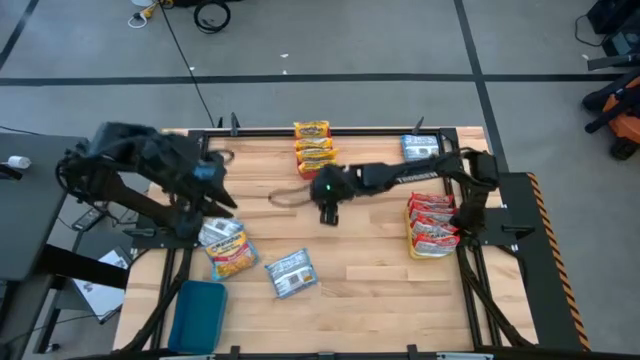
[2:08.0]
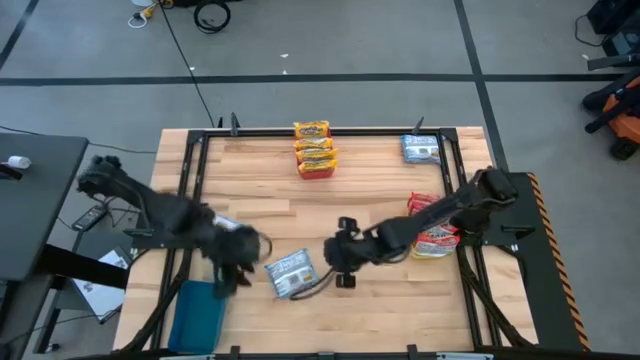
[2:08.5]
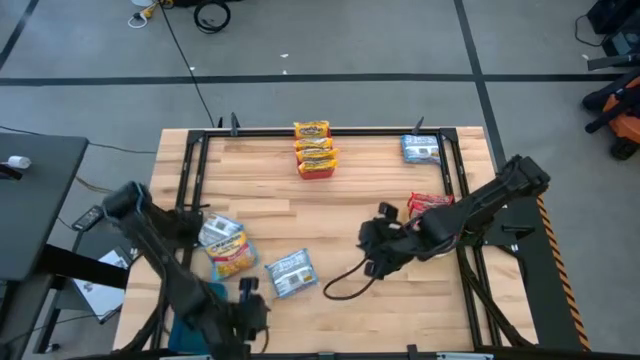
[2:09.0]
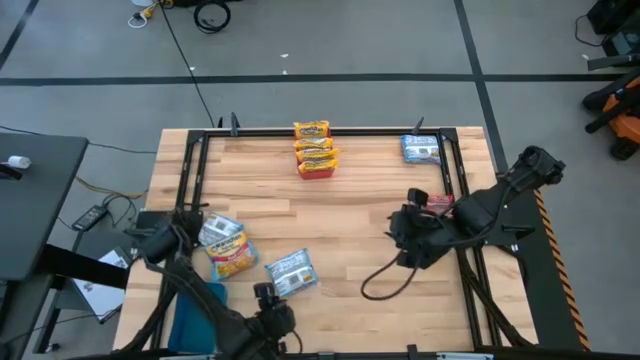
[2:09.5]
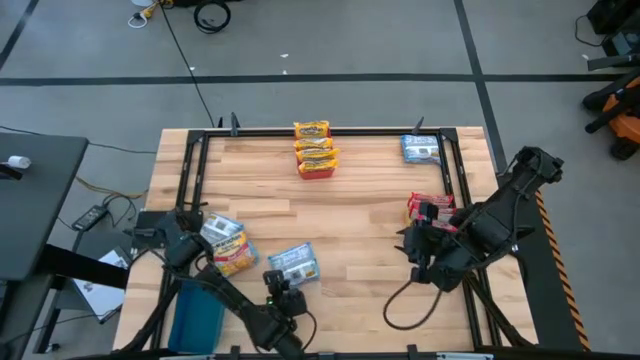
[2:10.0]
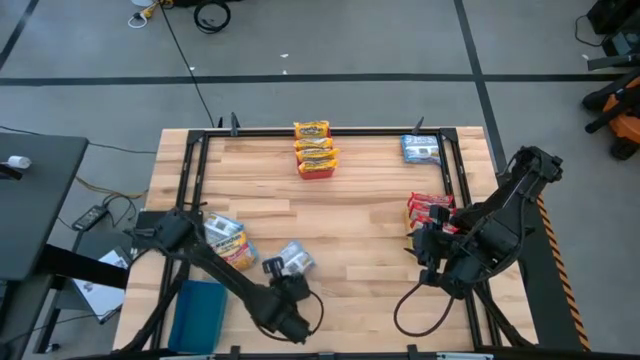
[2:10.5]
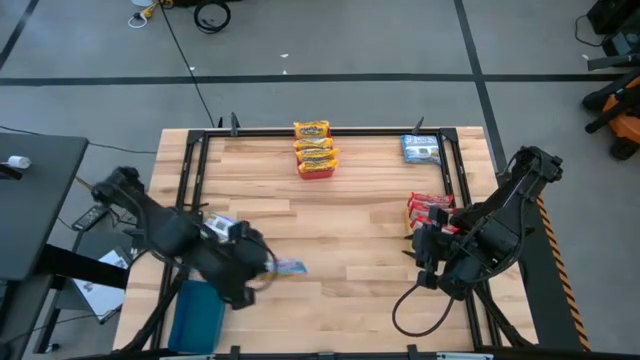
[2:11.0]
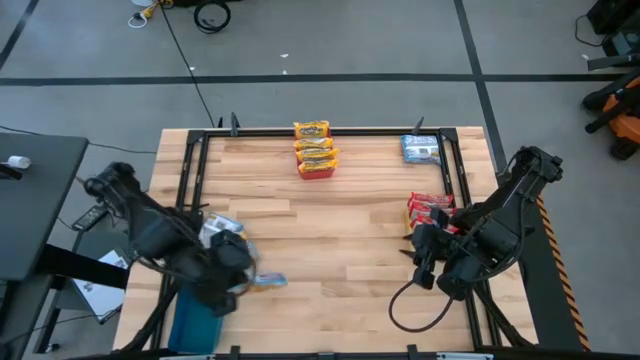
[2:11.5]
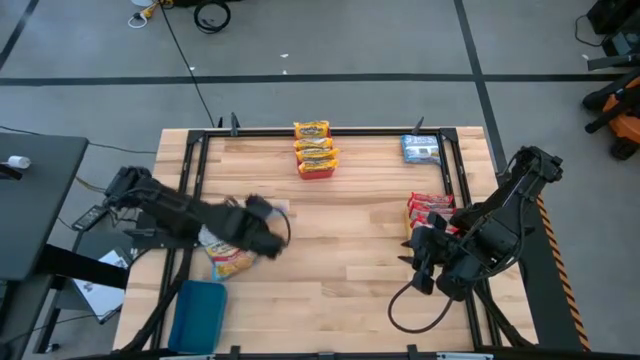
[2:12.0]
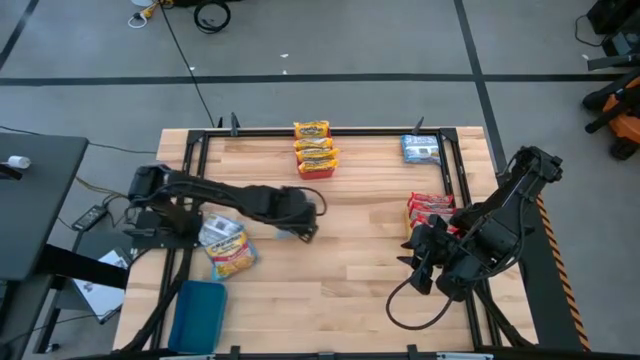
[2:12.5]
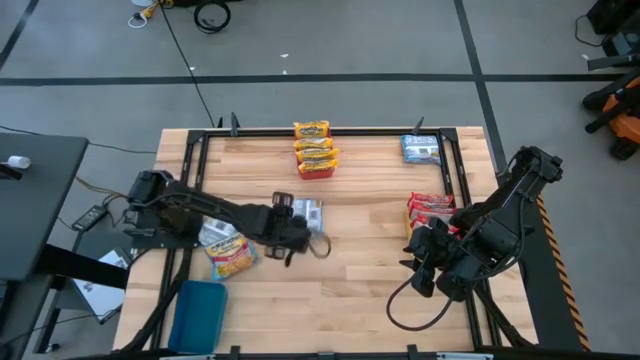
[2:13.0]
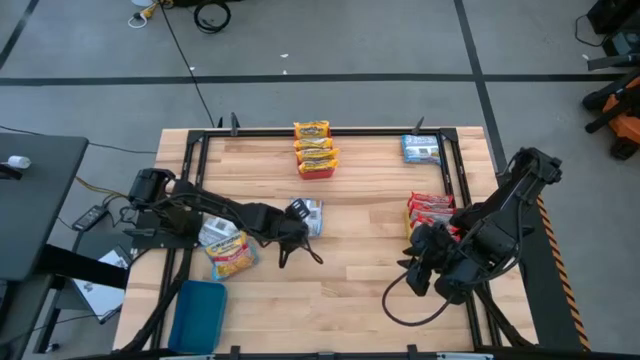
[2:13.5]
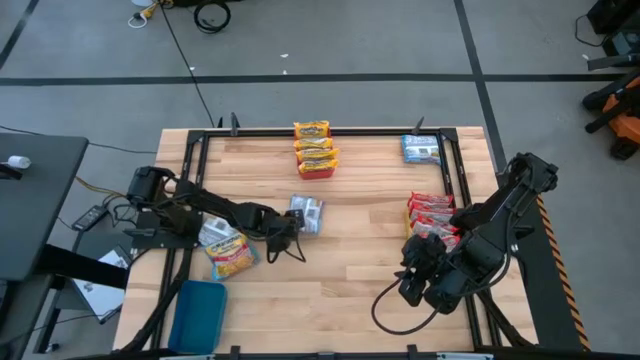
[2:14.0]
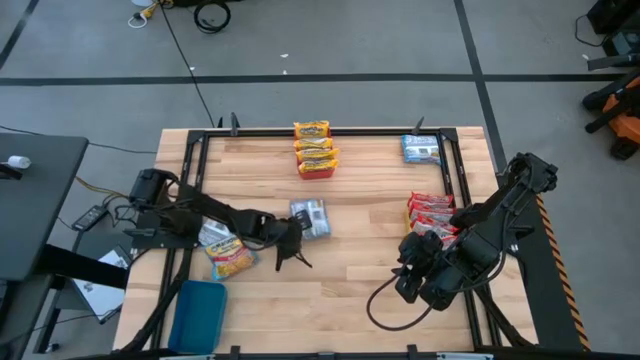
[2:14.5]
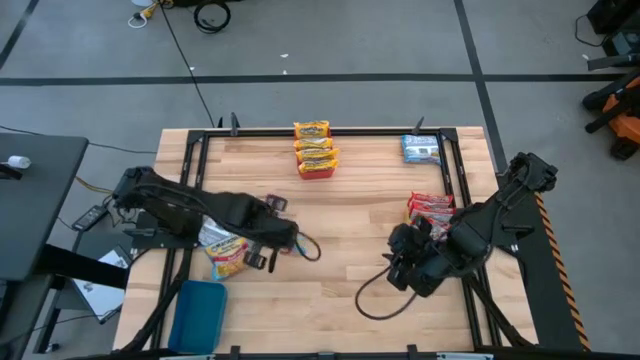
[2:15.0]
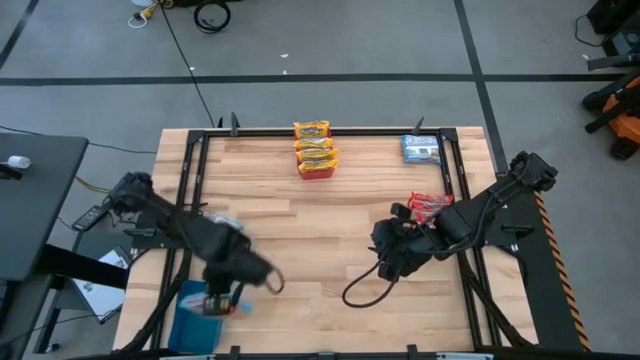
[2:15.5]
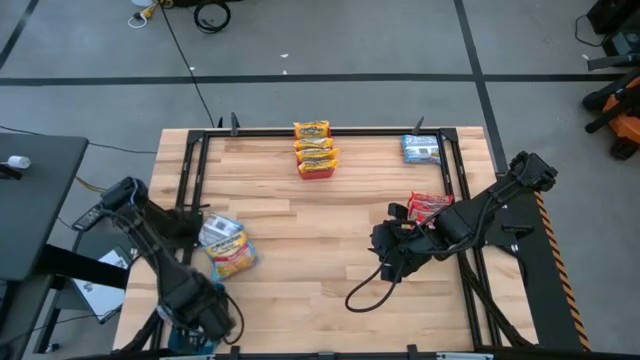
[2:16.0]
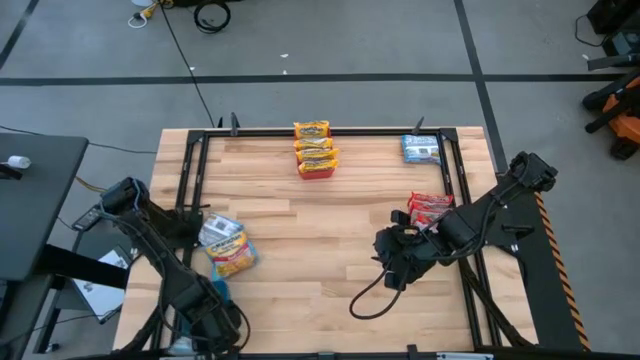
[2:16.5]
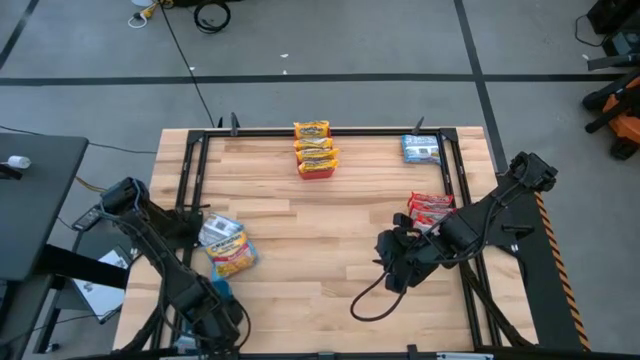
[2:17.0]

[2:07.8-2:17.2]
Task: Sort Maruchan noodles
Put the blue noodle pack into the blue bin

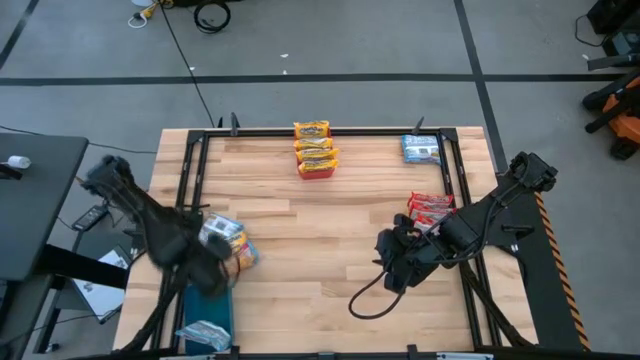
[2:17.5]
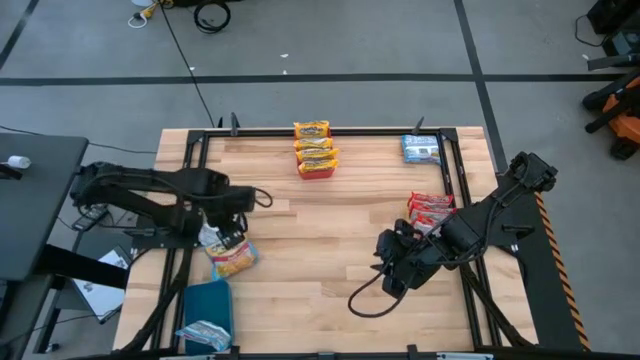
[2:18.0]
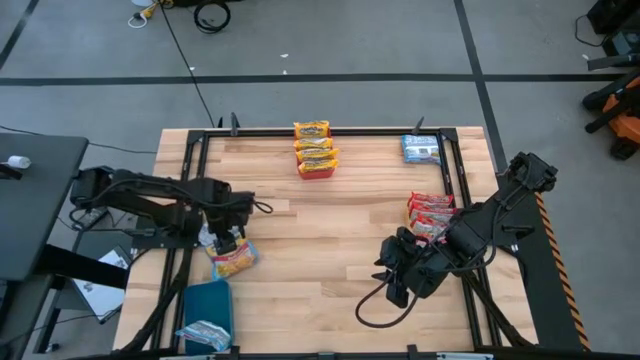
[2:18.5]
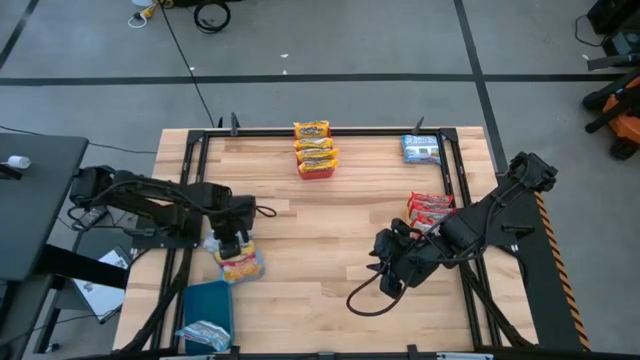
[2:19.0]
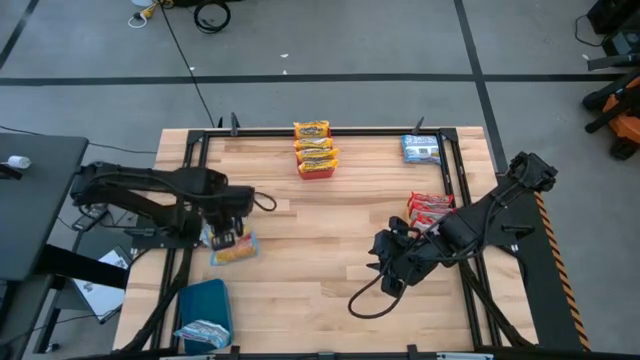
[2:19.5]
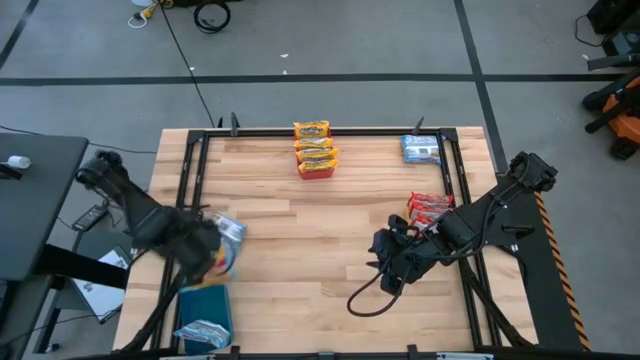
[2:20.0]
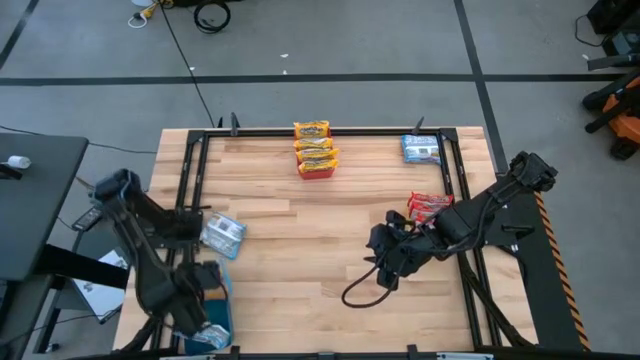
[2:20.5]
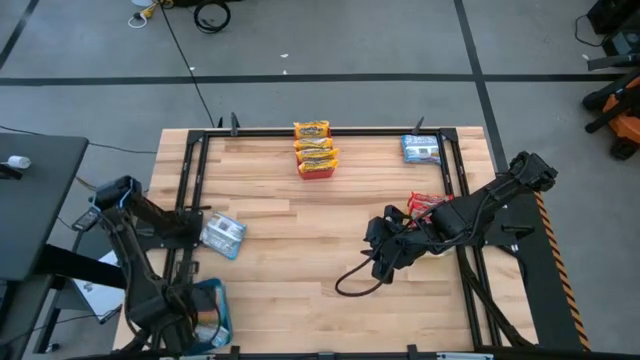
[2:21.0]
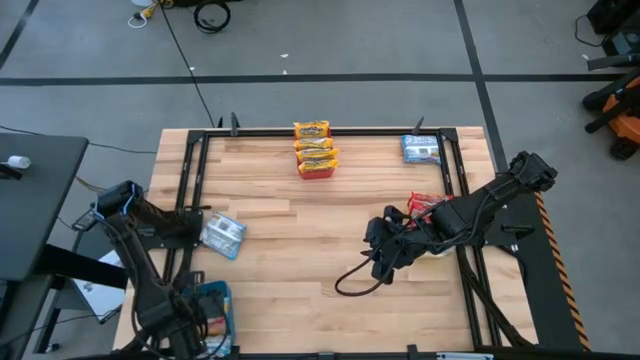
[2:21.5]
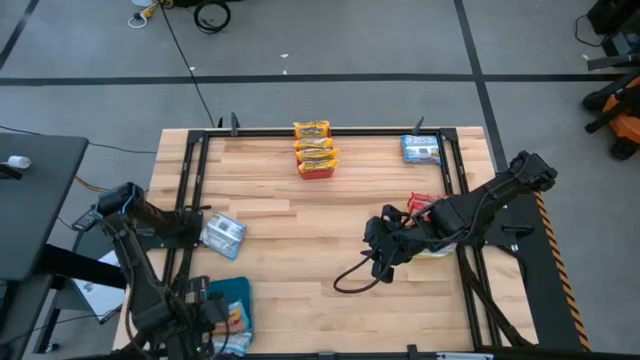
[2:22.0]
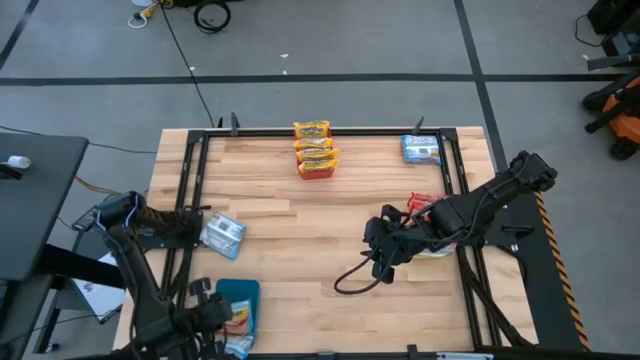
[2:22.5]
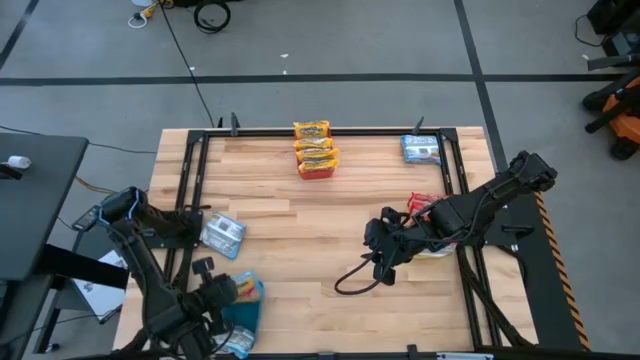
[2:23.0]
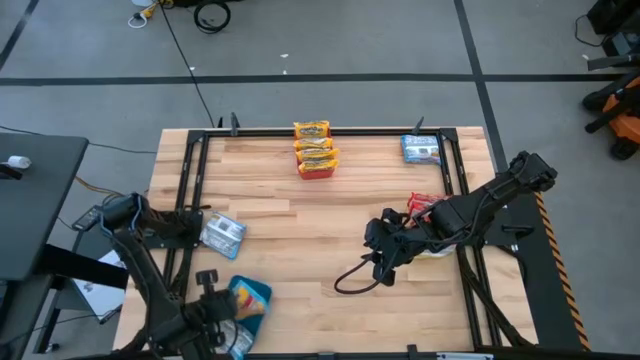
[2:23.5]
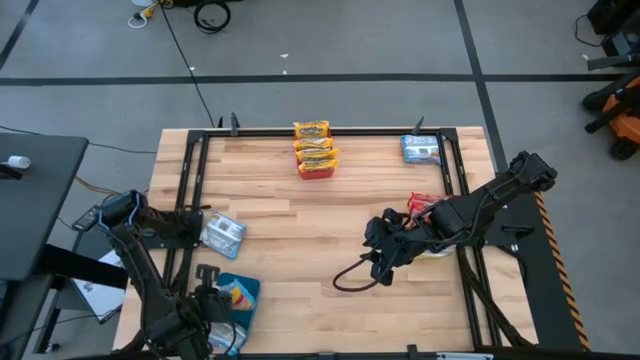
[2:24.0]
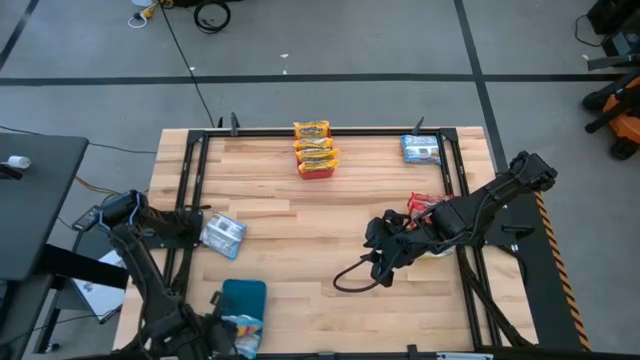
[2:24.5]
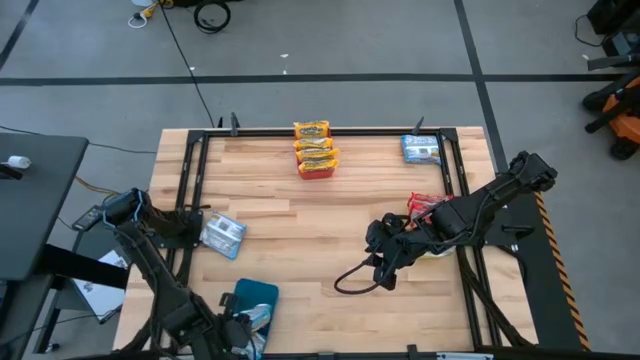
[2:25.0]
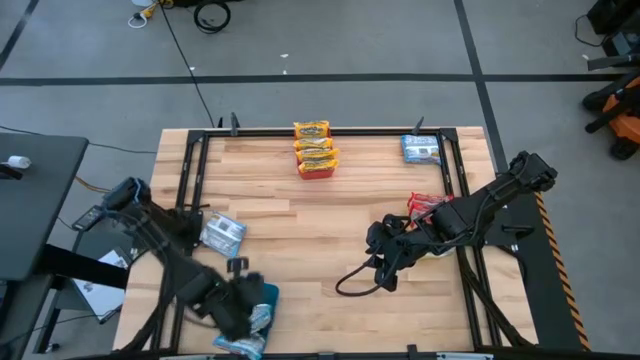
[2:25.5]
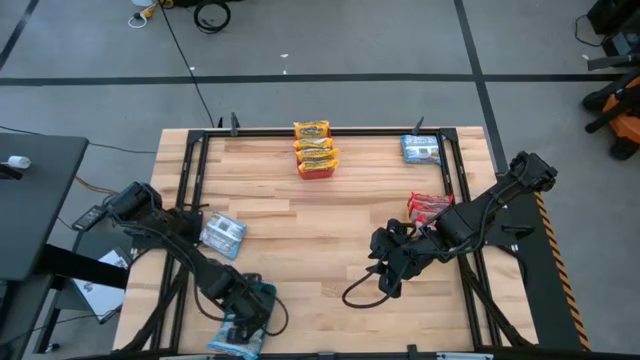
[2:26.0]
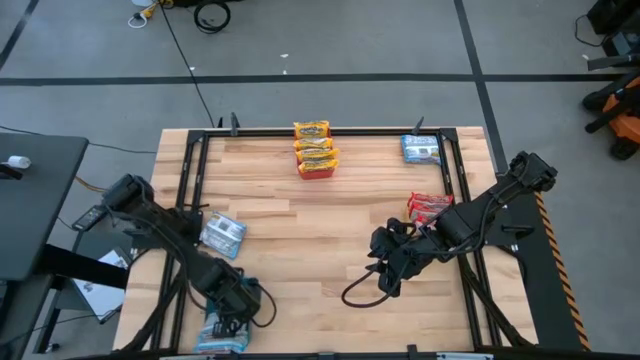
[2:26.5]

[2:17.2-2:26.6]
Put the blue noodle pack into the blue bin

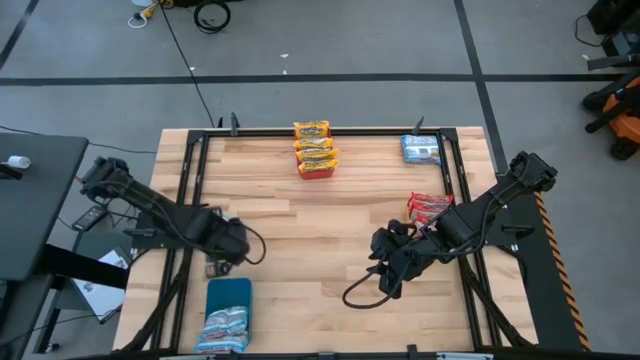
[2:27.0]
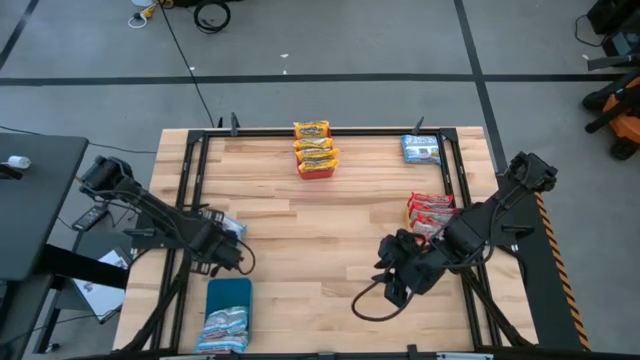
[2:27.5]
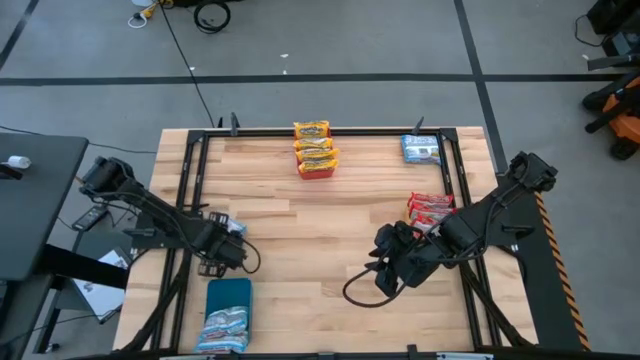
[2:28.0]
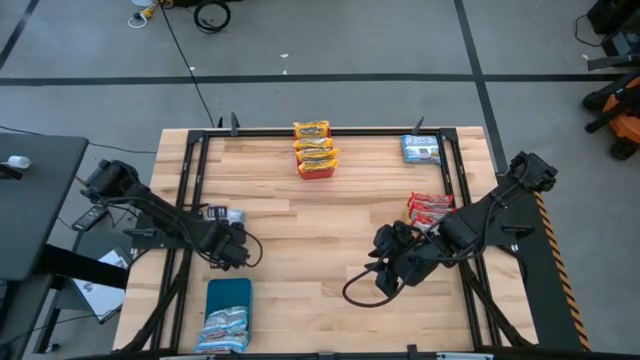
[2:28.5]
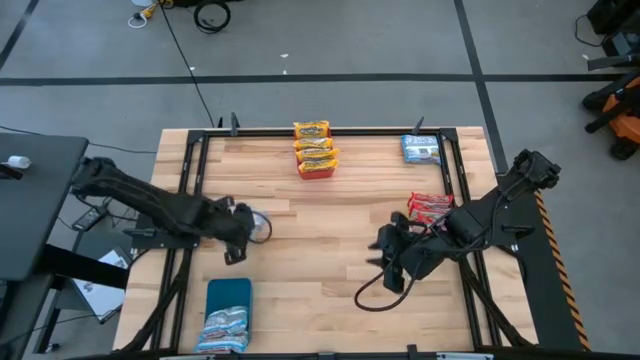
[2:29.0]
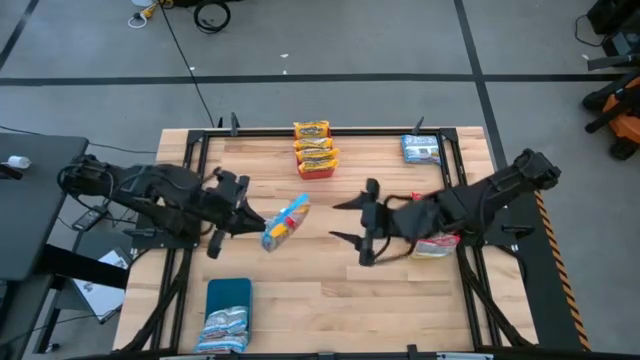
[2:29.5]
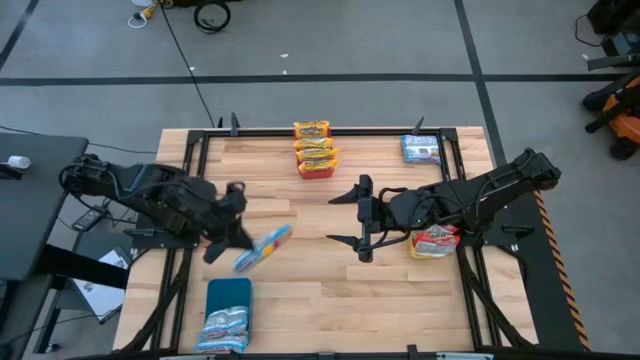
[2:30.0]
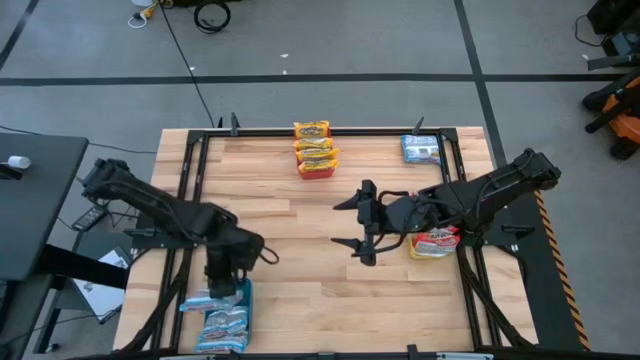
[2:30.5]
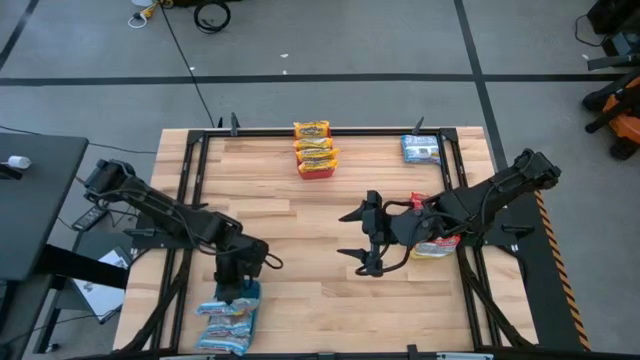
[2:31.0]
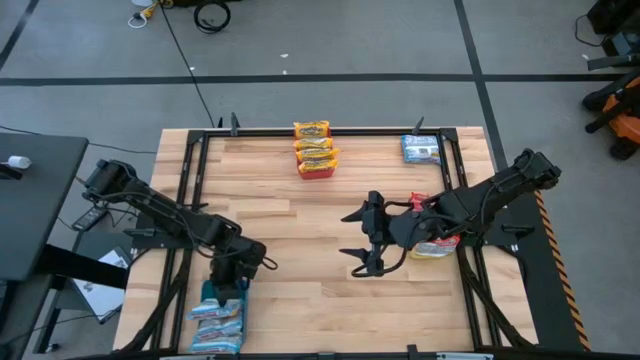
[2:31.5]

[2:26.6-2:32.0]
Put the blue noodle pack into the blue bin
